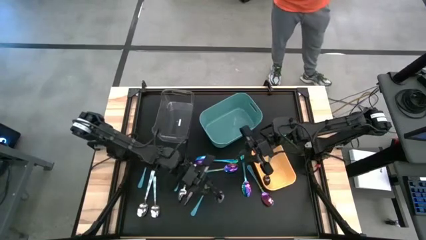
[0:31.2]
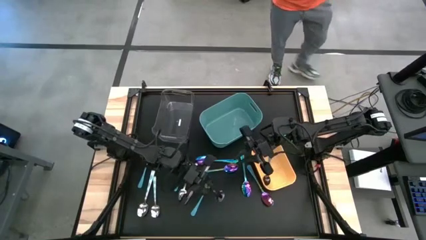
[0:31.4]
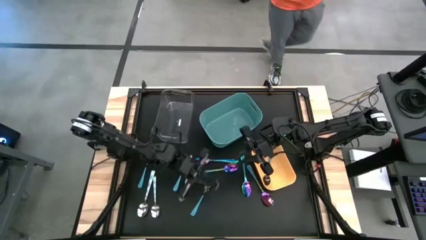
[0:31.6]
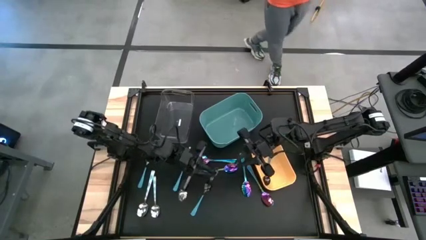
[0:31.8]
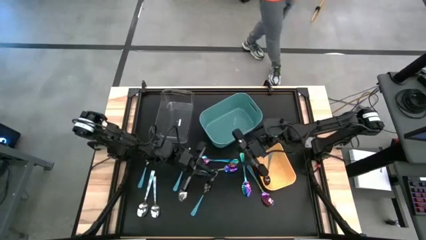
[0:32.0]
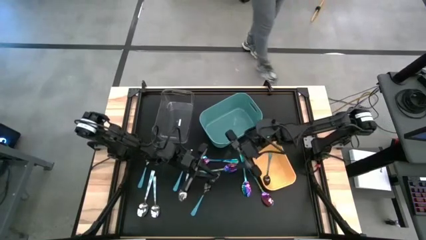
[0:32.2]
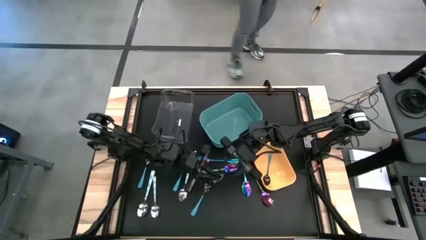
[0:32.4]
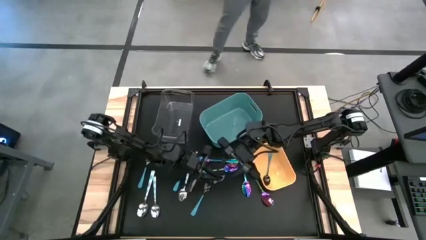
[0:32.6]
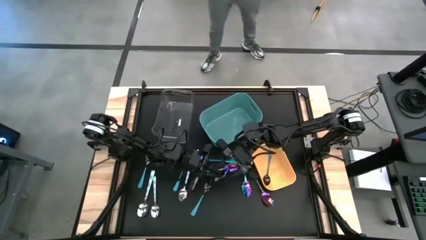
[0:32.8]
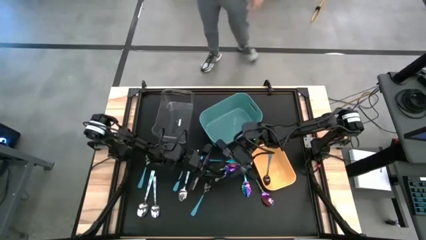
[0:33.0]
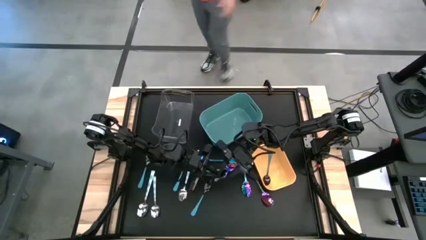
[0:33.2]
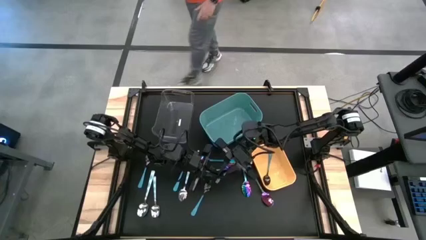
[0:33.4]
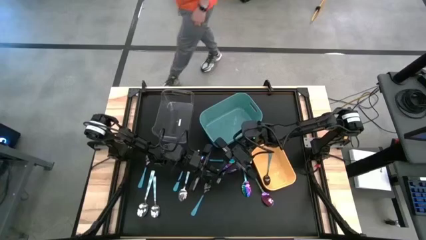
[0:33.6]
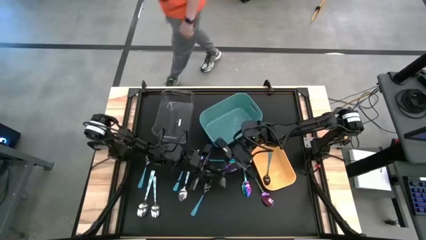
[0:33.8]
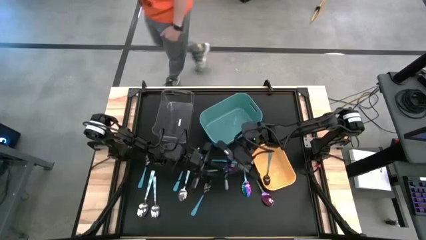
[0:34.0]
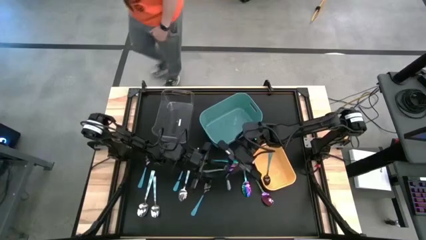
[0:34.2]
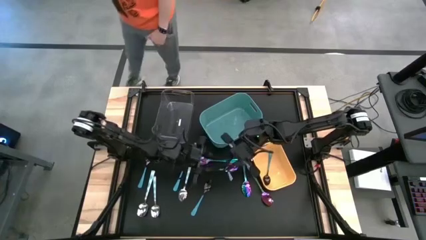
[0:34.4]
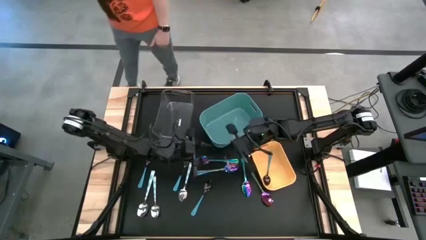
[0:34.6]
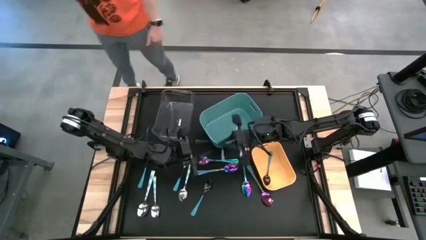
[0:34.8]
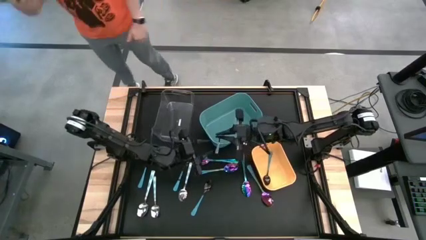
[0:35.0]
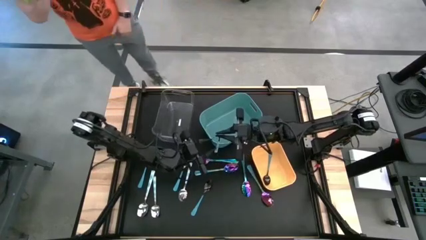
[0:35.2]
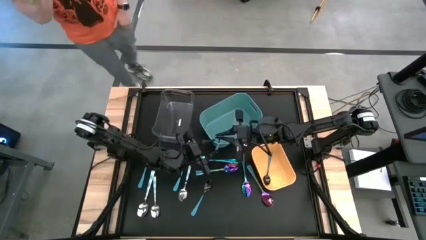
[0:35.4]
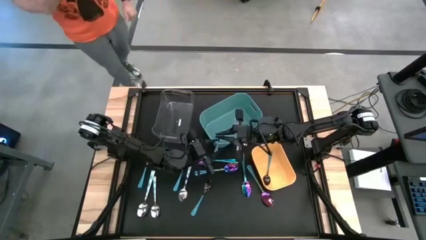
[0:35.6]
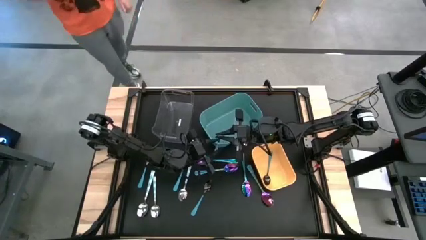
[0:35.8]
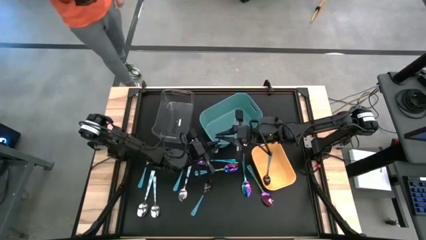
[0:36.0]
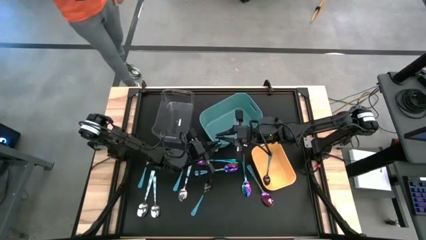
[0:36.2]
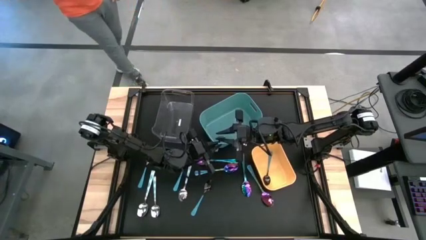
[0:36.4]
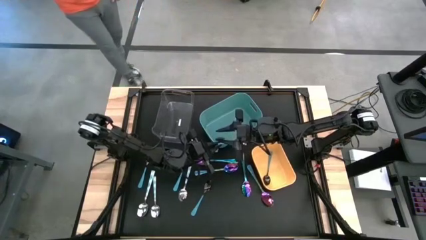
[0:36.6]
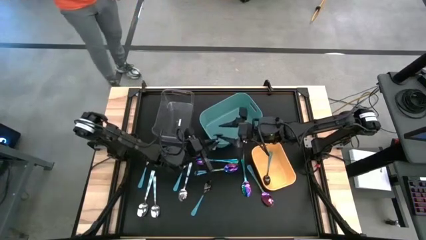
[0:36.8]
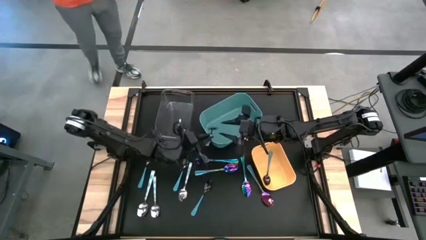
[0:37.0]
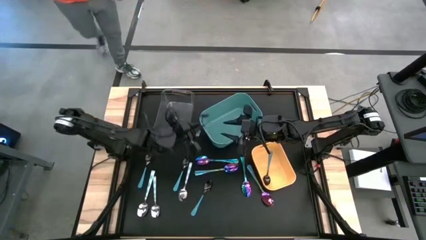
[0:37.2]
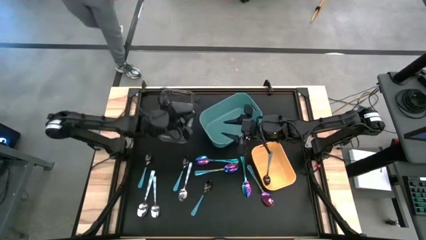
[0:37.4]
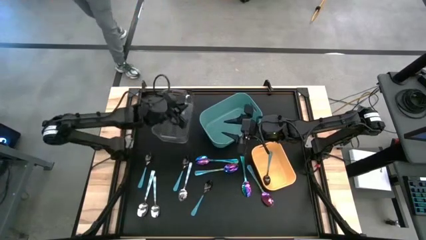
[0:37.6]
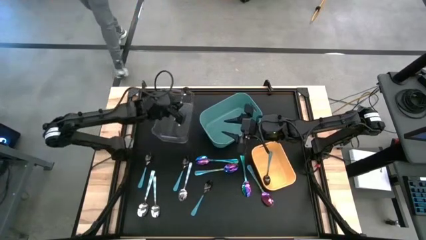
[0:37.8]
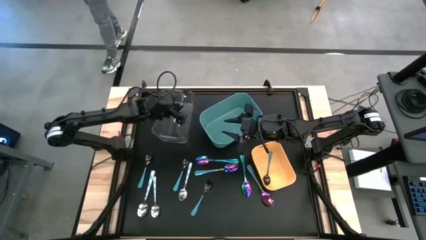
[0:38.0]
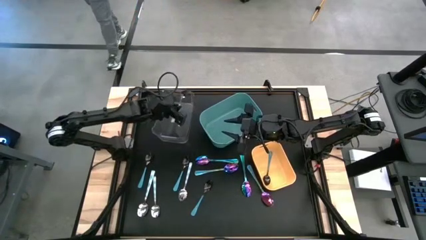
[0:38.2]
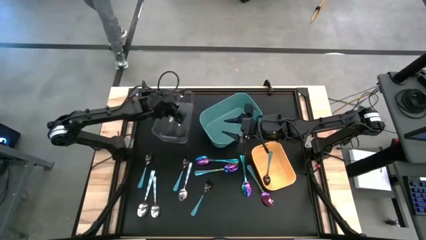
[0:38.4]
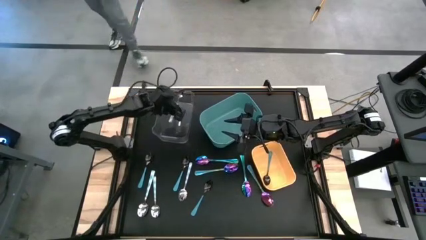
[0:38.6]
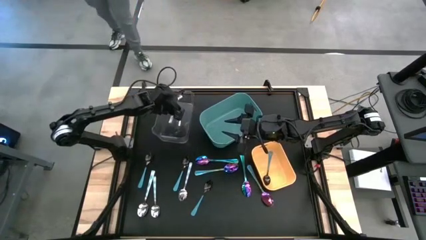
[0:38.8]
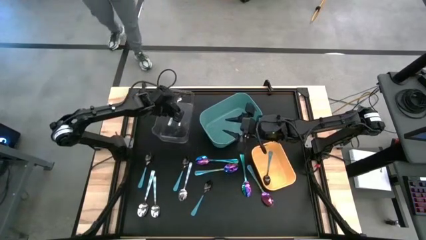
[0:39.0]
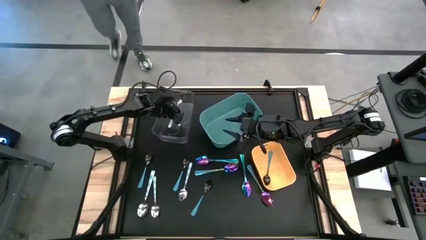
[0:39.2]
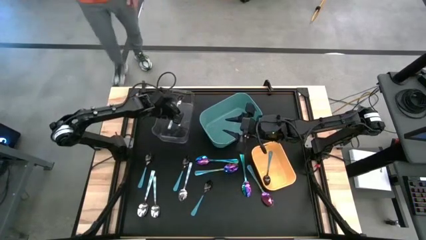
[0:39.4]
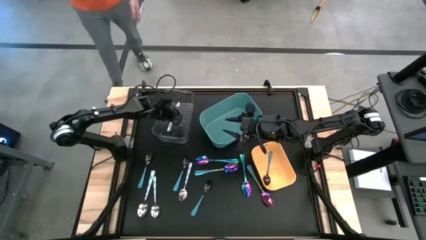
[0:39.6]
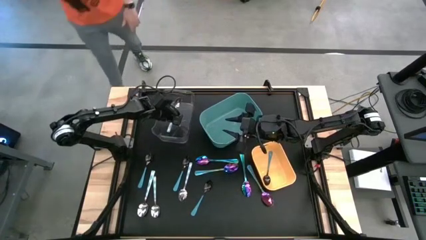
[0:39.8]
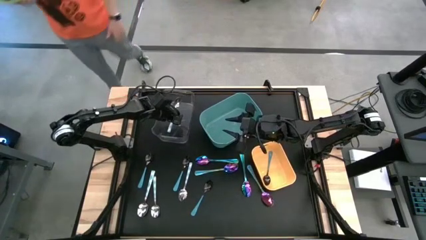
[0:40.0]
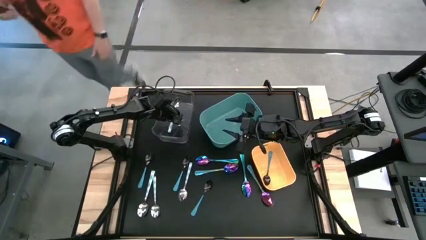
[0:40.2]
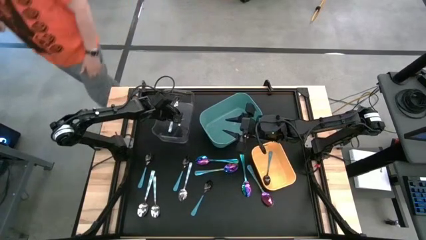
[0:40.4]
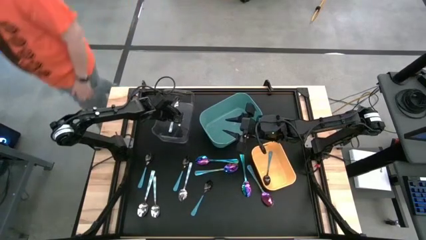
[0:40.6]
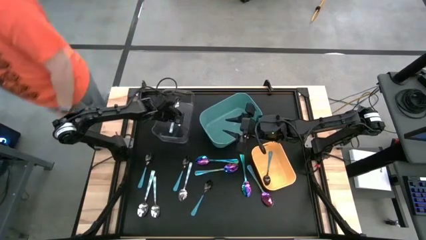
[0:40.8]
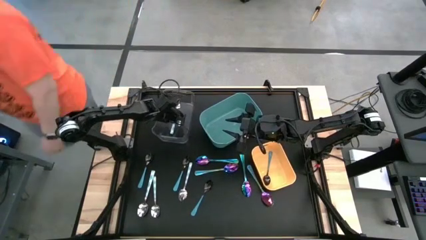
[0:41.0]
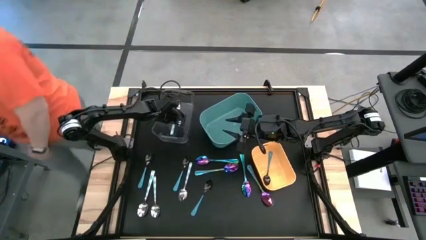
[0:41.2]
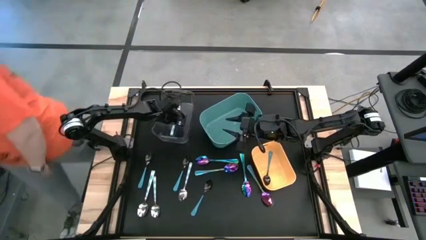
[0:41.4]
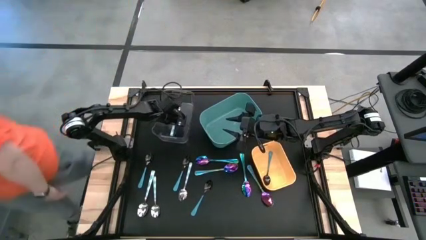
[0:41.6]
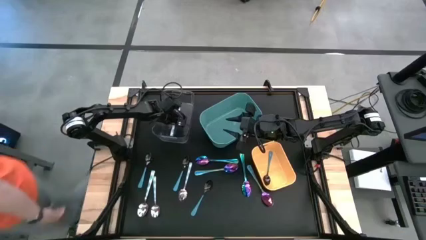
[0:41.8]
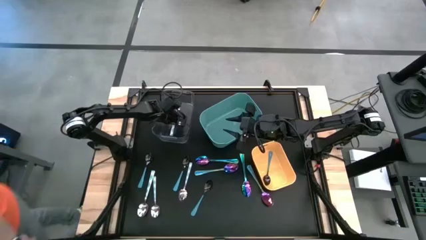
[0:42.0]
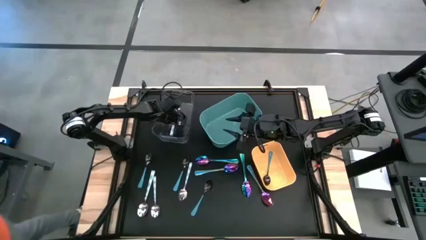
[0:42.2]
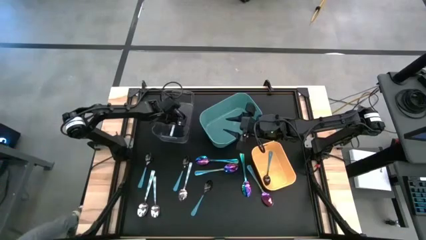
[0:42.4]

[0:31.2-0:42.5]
Task: Sort silverware by color (type)
Put the patterned blue spoon into the transparent bin

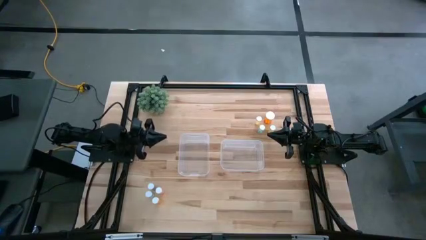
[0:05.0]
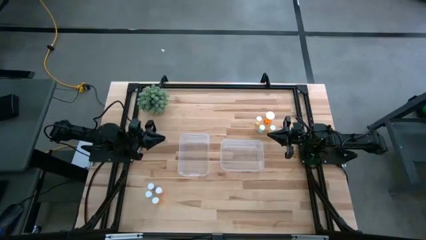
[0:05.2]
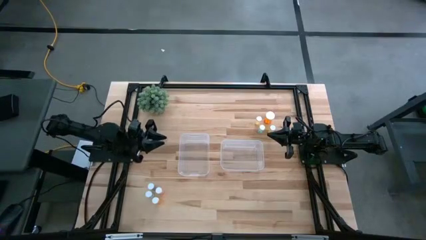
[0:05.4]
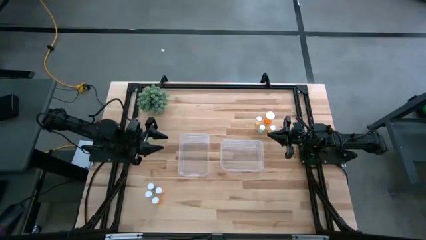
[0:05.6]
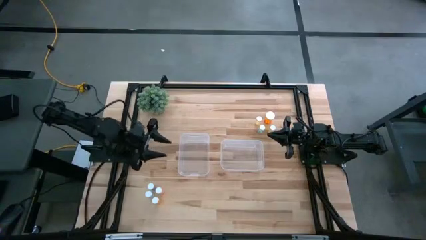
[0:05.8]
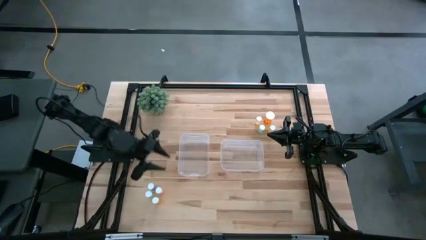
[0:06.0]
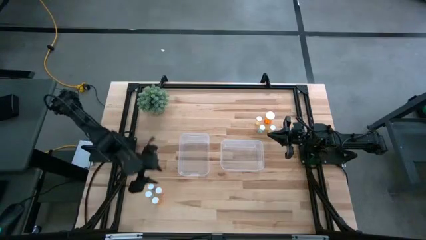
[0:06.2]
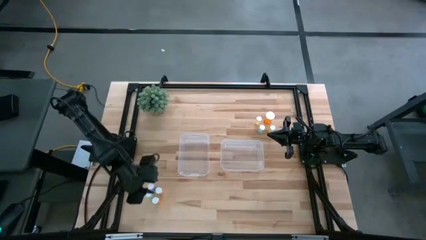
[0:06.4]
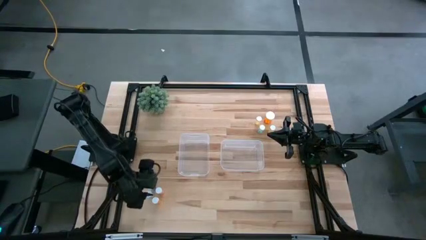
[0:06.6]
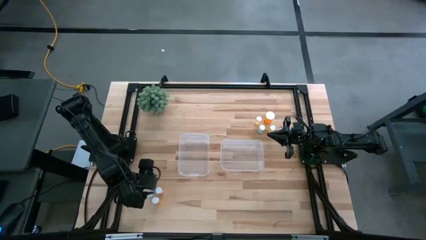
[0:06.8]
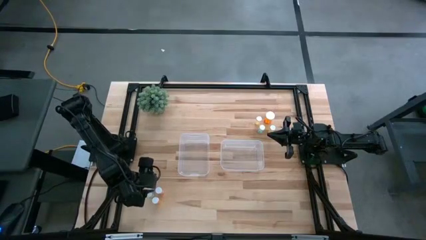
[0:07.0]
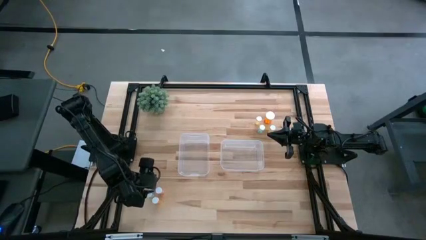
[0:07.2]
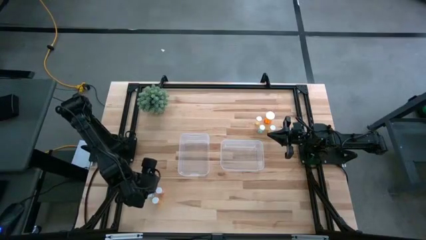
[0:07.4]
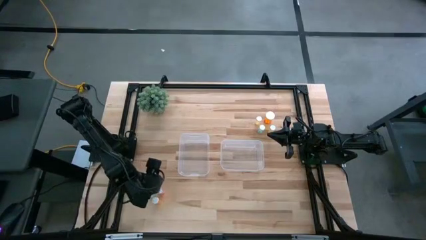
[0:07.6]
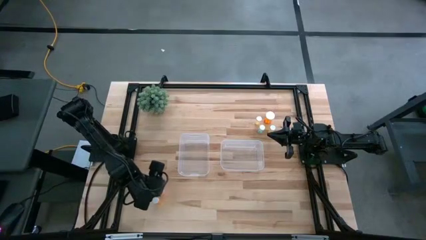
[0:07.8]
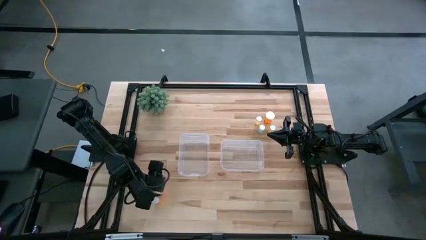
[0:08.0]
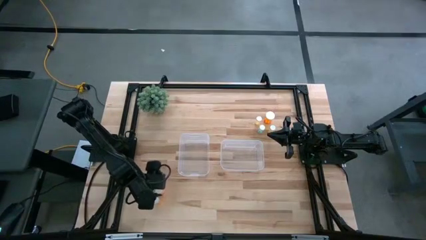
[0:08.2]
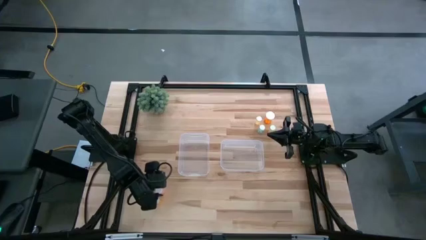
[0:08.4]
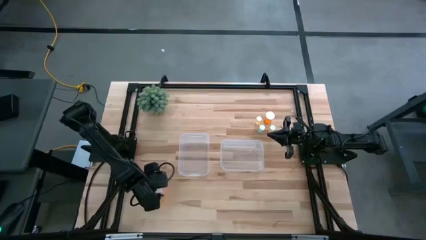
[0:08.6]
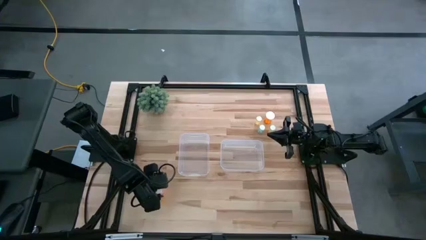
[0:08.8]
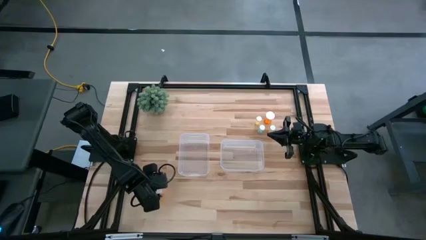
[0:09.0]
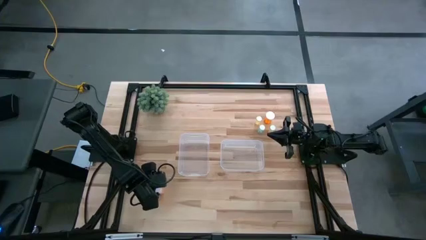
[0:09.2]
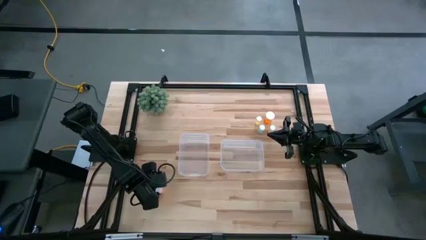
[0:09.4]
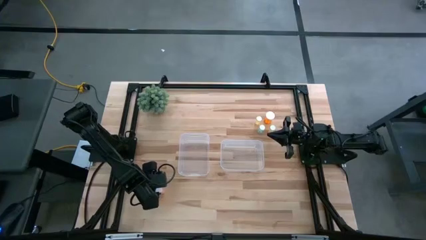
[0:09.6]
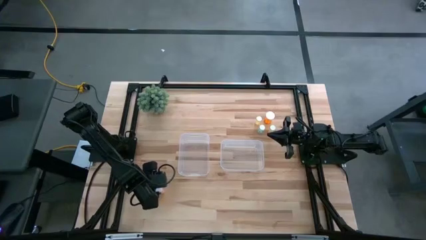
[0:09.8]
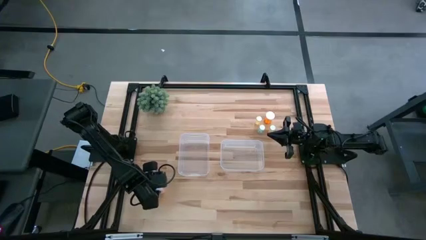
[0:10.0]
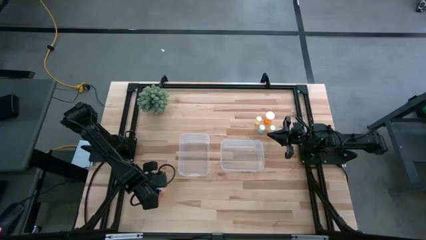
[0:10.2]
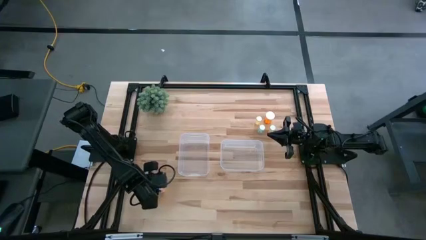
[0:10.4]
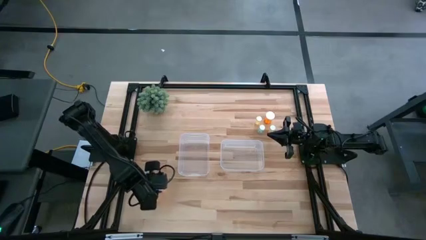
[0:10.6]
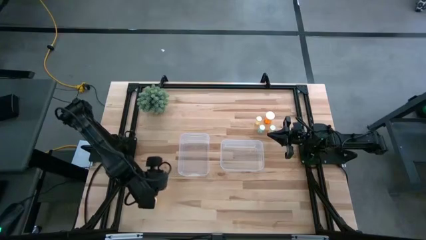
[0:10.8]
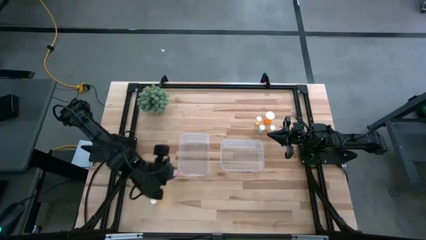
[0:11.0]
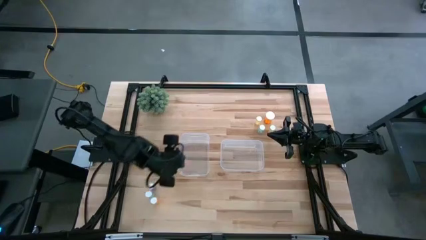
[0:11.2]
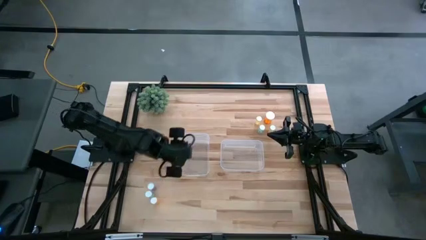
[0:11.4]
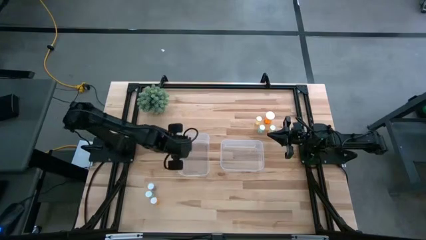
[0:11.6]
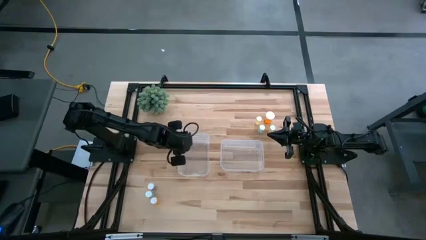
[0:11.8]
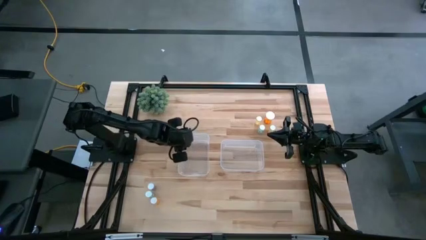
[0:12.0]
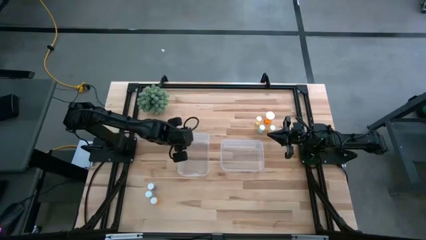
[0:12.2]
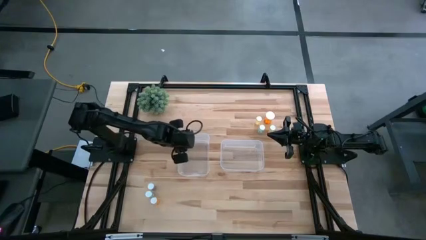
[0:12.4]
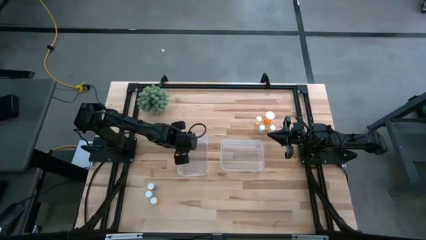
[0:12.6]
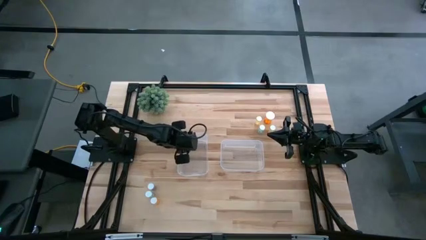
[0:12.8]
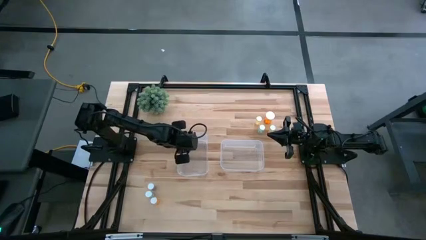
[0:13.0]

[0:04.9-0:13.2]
Task: Pick and place medicine bottles into bin by pill shape (circle, oval)
Put the pink tablet bottle into the left transparent bin
